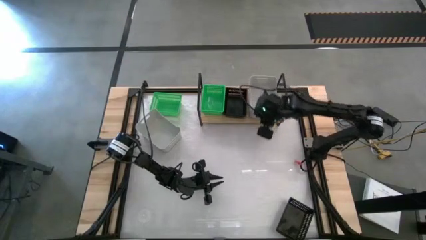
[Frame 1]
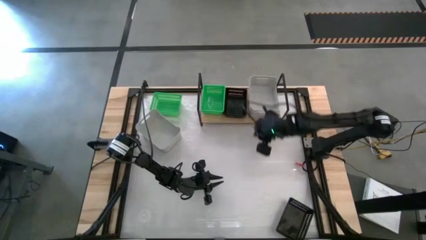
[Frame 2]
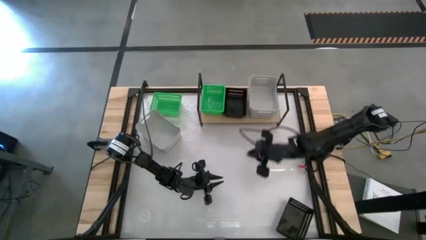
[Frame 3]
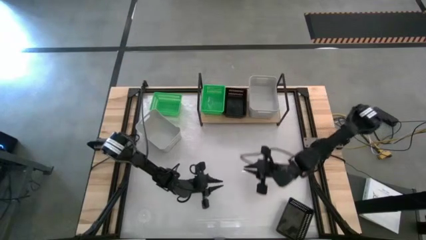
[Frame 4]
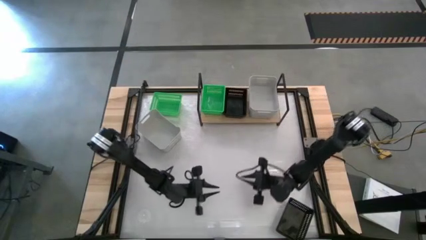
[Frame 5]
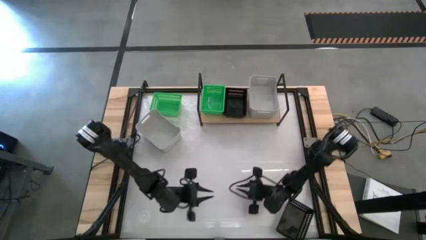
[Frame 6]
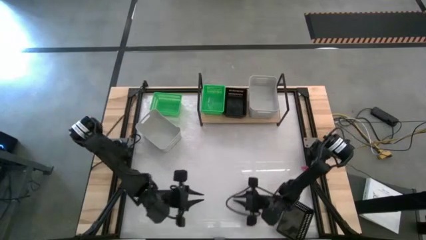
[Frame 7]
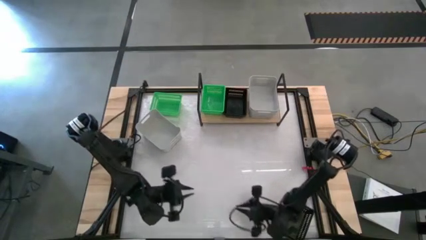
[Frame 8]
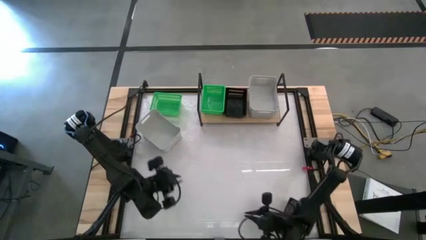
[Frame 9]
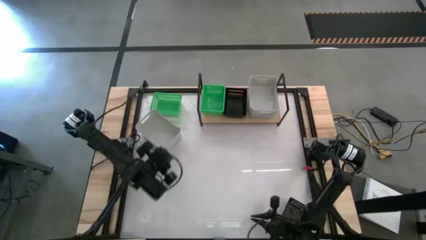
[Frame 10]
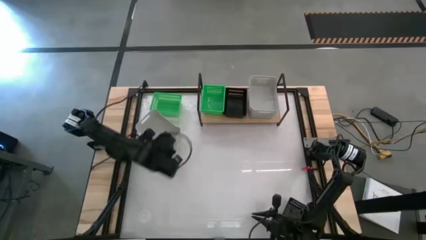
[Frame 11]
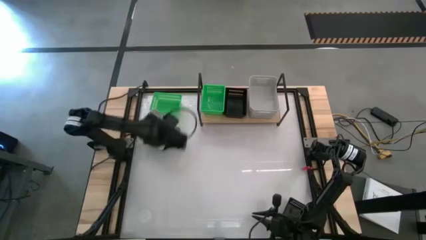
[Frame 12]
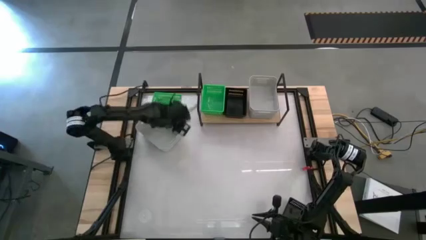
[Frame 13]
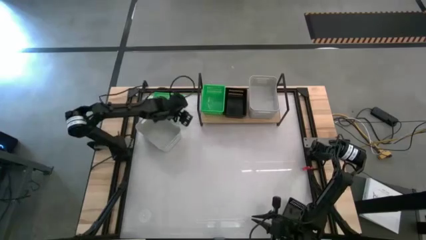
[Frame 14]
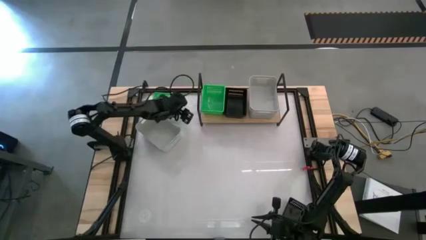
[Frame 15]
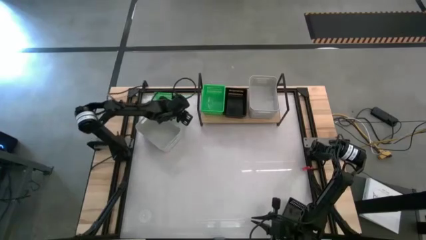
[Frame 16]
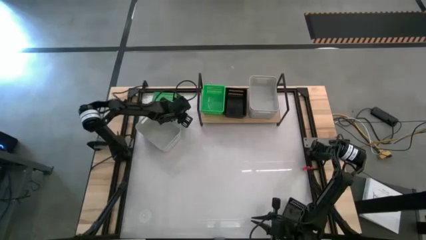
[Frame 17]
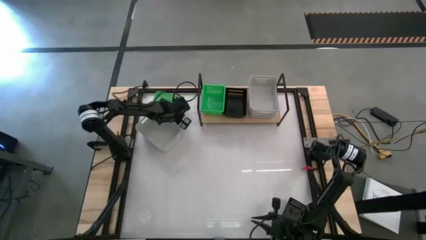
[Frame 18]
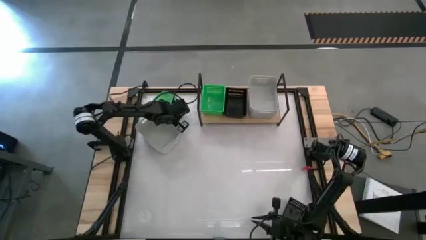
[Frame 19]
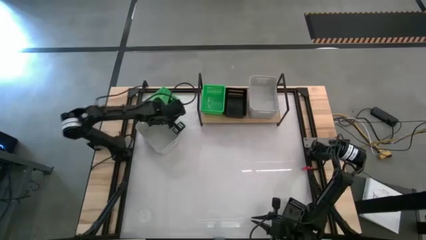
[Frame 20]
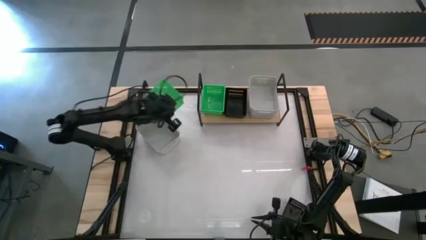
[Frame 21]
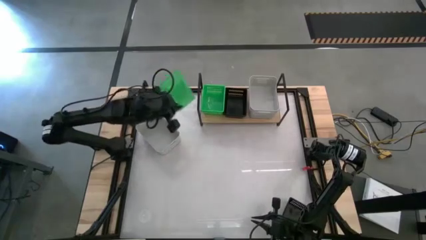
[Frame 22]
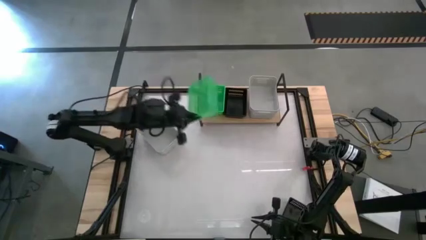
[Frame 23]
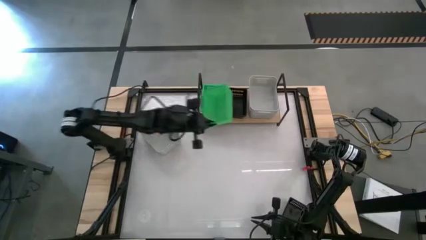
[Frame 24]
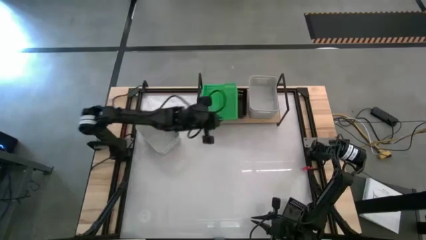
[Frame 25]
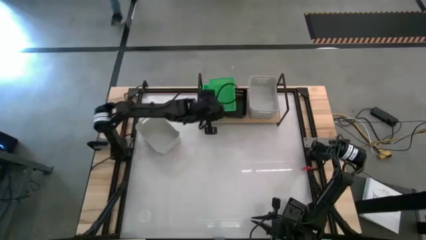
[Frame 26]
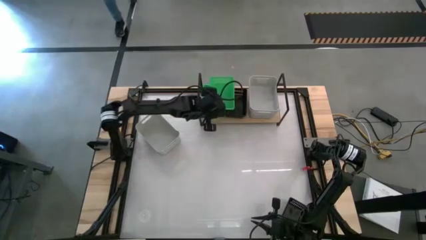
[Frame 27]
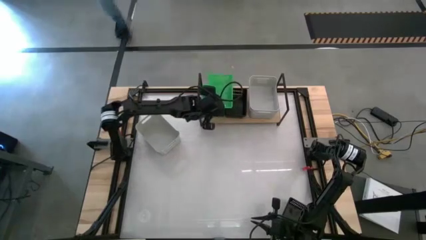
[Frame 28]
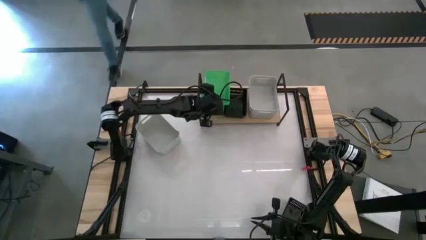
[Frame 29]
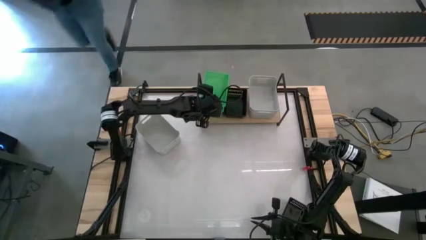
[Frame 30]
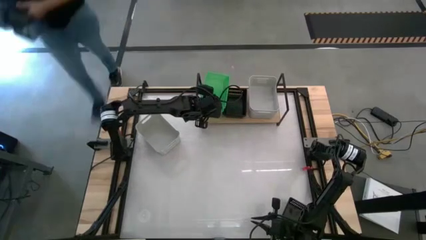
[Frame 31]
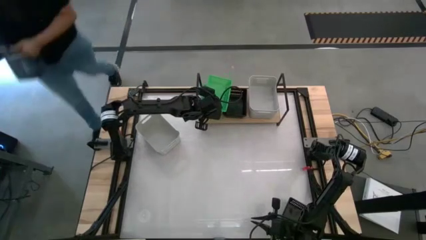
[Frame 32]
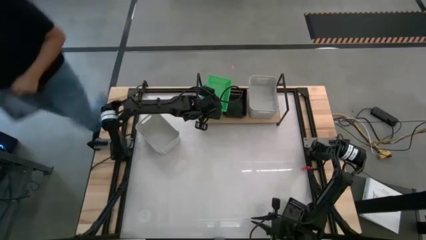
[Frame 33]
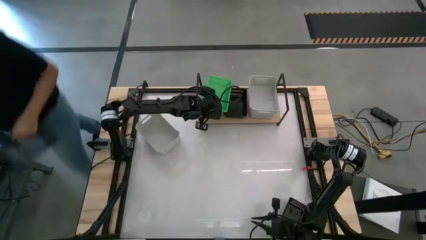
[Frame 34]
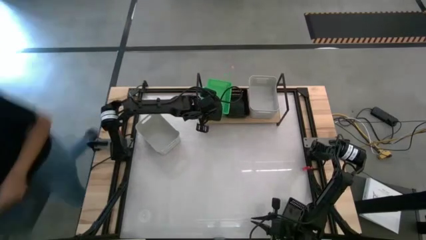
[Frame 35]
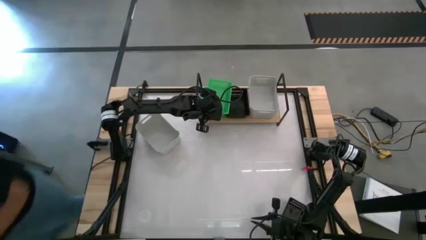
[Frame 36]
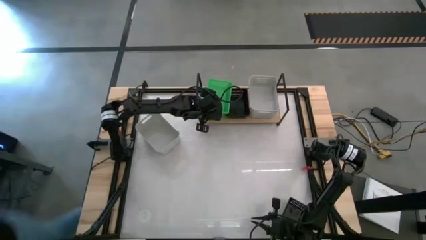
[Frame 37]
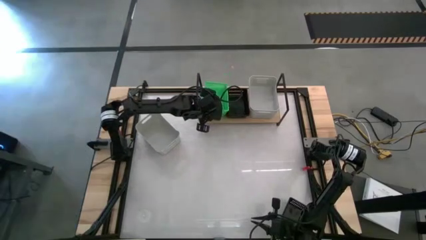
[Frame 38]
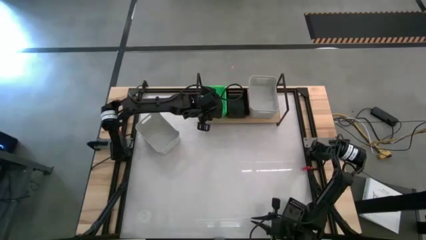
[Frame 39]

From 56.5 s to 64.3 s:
Task: Stack baskets on shelf by color
Stack the green bin on top of the other green bin on the shelf

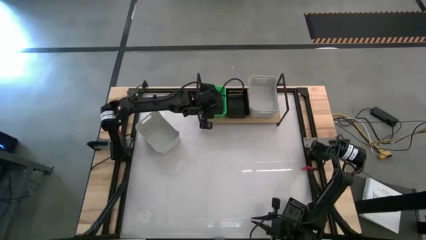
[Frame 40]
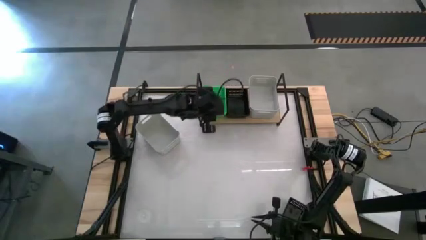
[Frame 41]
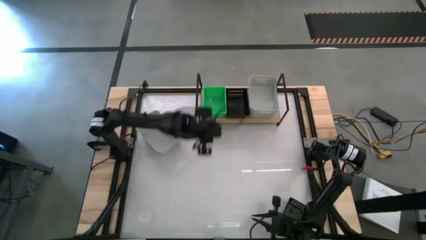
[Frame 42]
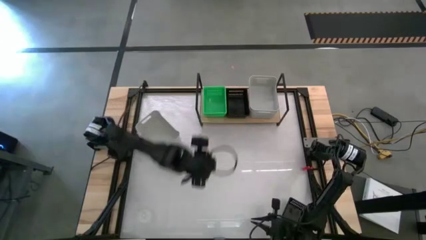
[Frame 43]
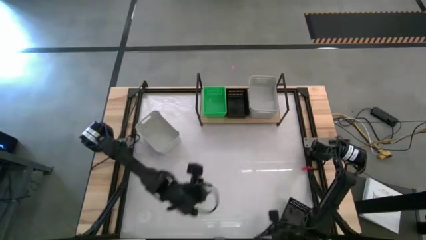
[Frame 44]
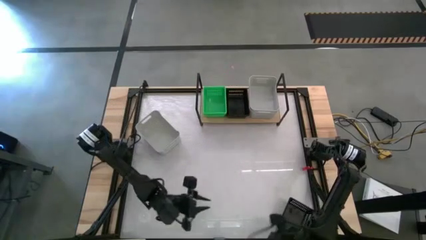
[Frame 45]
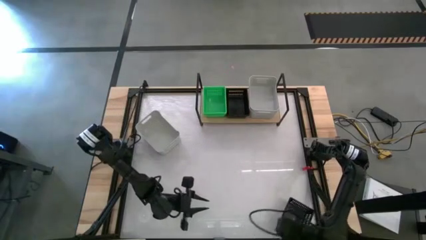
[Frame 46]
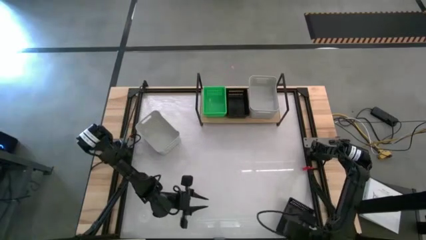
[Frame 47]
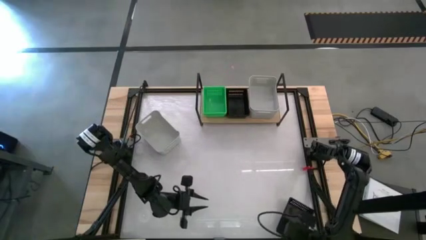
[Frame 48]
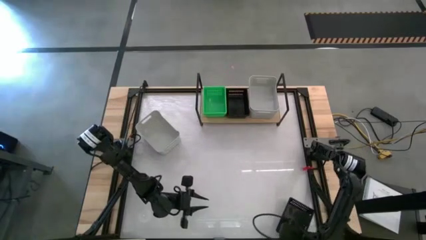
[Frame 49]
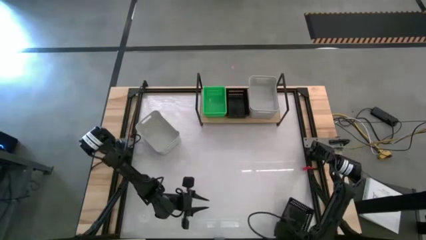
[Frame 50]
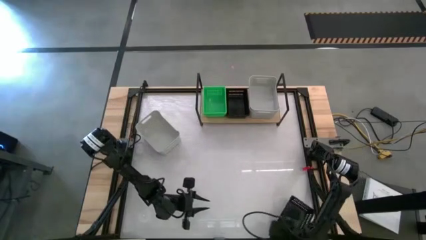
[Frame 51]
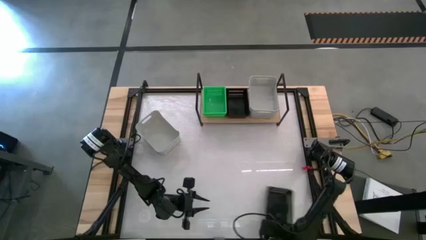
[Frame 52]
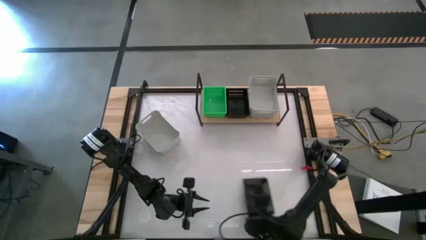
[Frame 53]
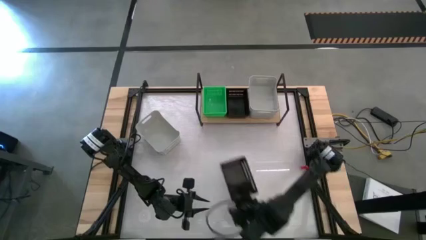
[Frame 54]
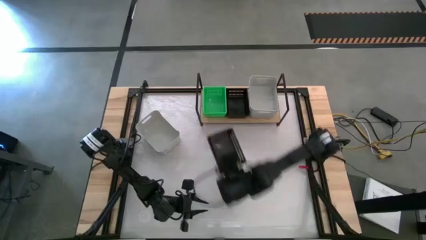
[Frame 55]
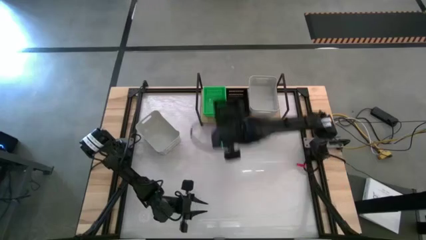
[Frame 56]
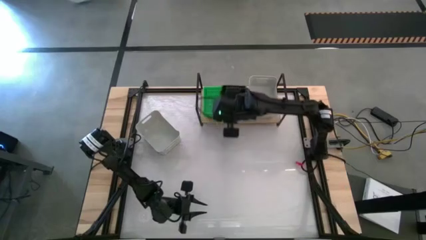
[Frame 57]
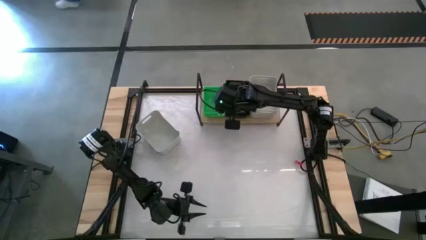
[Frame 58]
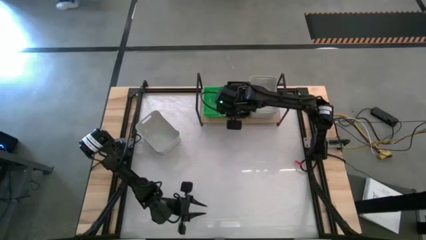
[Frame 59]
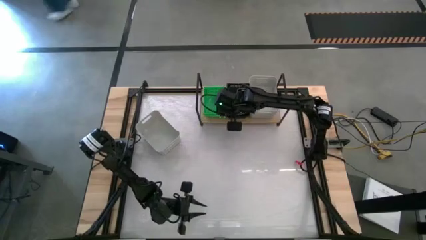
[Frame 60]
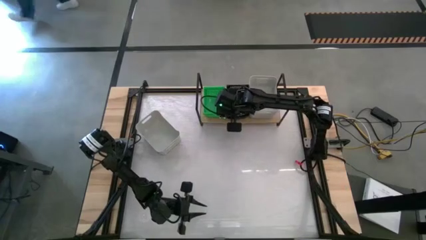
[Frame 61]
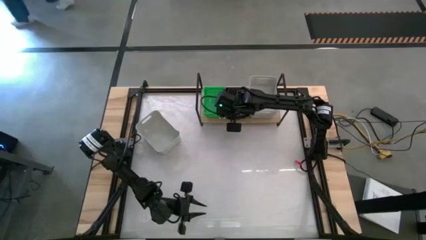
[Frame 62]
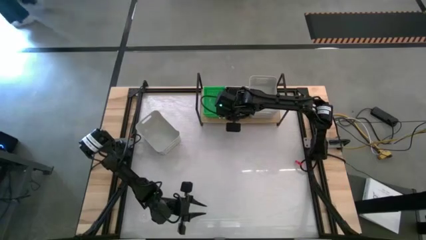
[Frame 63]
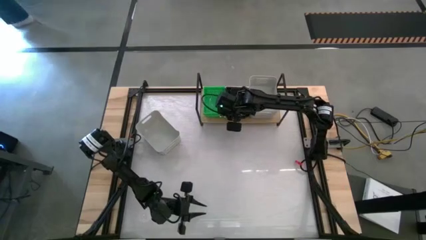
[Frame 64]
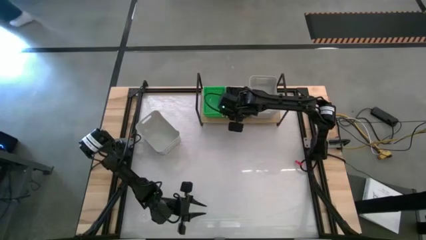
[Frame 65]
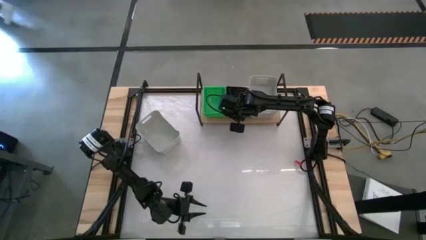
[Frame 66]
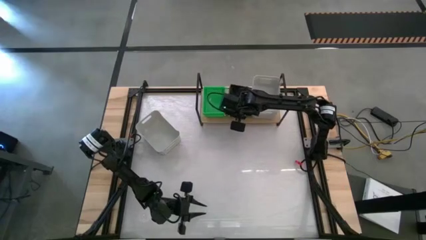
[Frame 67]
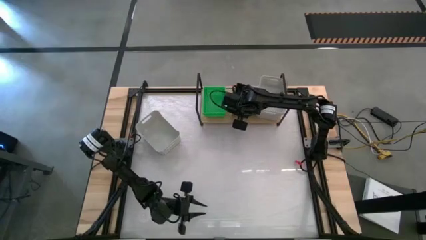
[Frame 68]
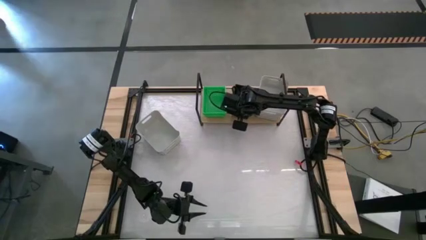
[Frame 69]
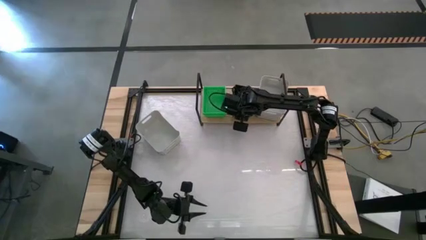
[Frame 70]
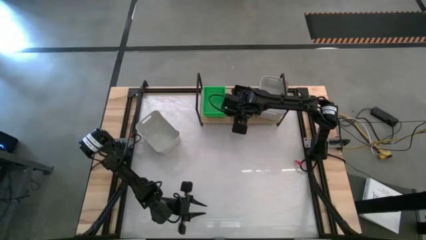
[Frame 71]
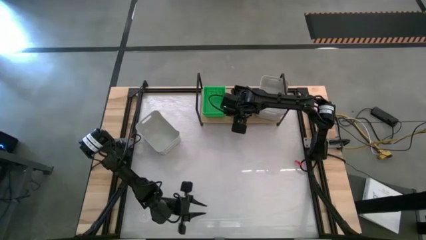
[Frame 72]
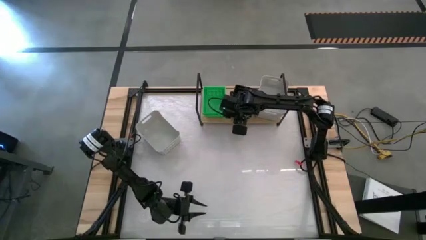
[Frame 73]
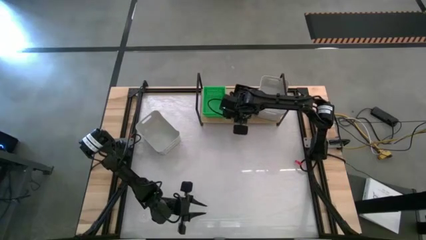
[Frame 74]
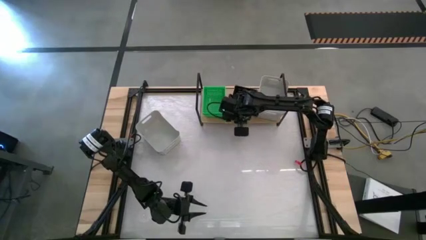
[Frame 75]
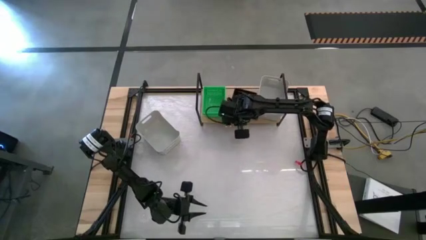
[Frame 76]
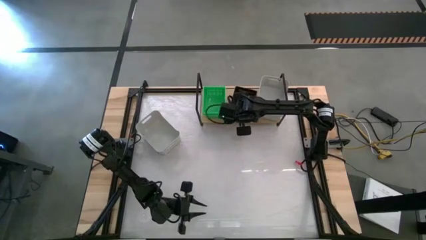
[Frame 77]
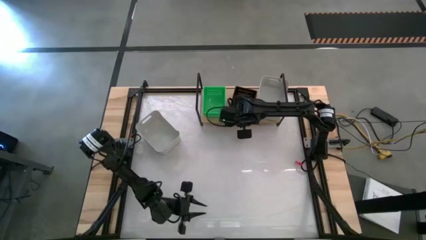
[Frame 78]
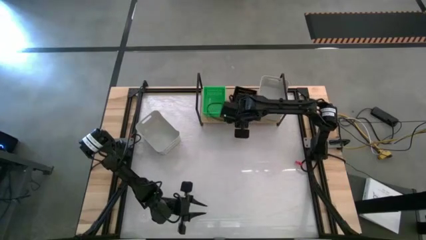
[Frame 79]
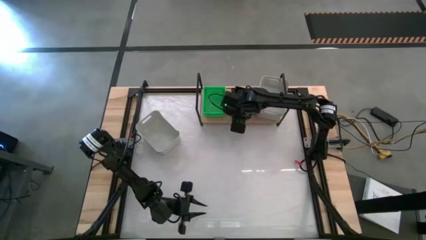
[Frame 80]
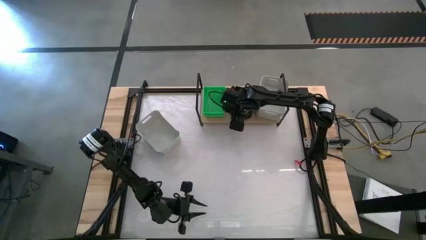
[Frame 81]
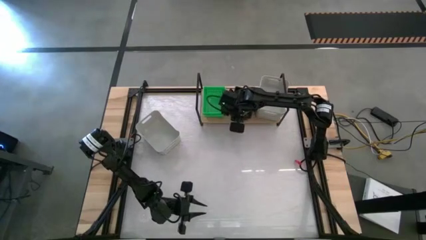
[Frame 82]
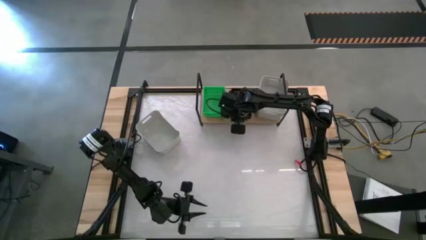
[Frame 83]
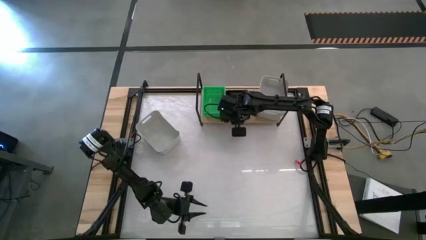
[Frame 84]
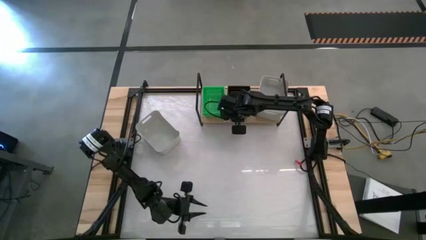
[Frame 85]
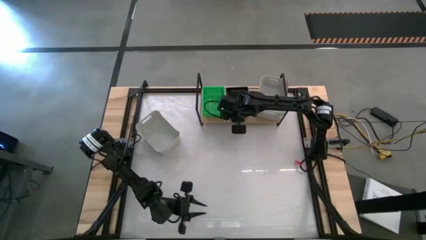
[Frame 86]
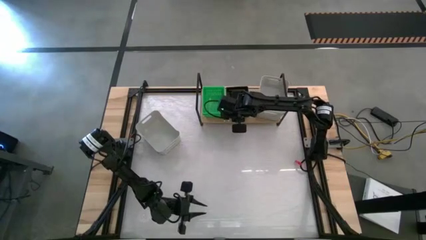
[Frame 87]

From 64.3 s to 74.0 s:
Stack the black bin on top of the other black bin on the shelf
